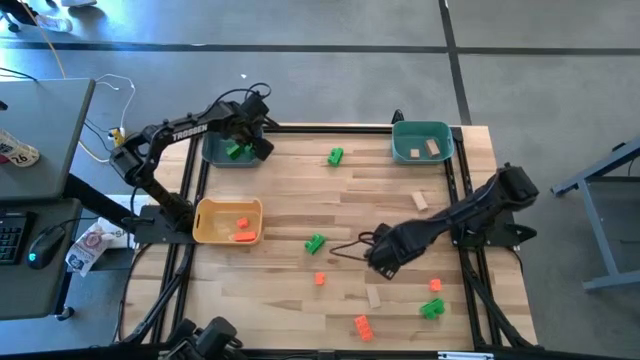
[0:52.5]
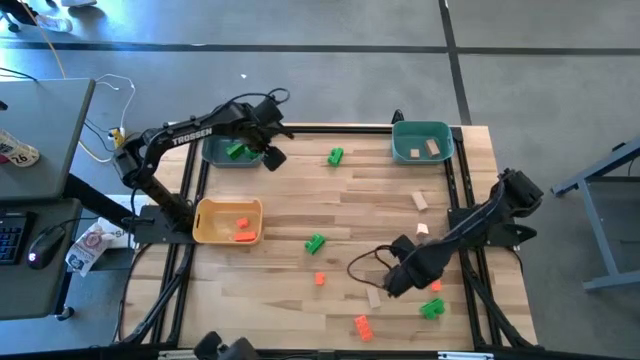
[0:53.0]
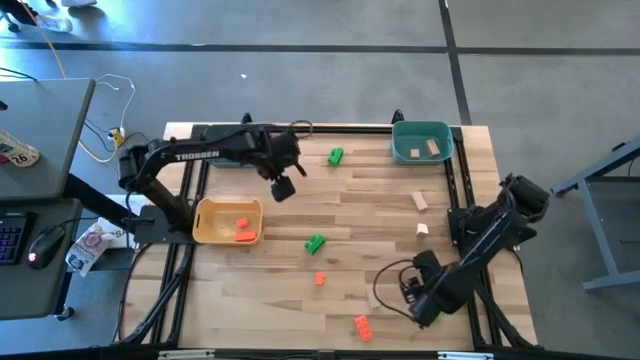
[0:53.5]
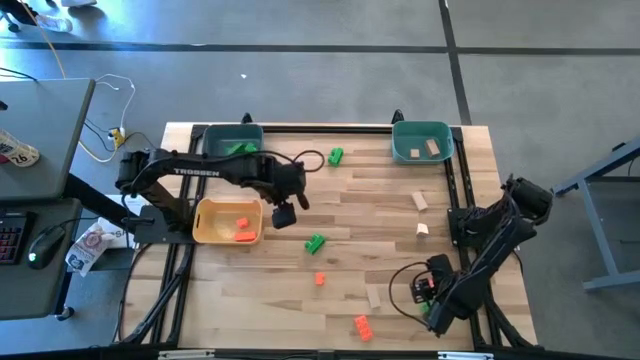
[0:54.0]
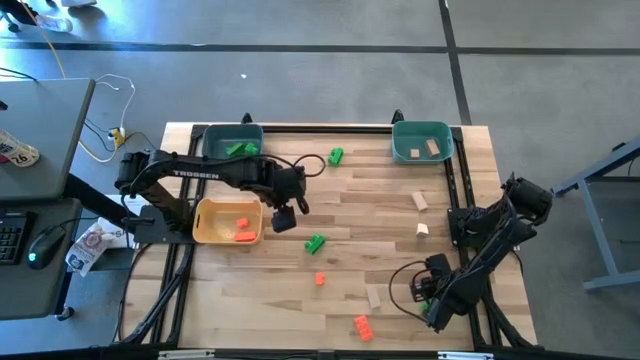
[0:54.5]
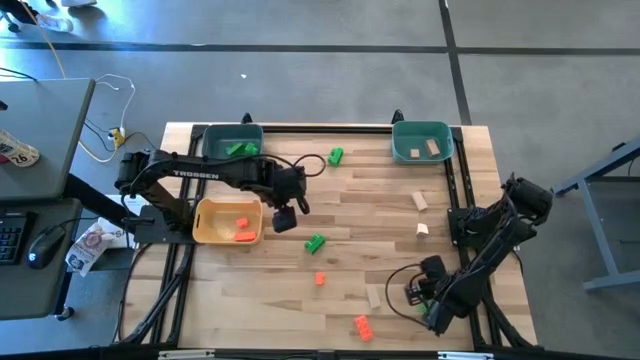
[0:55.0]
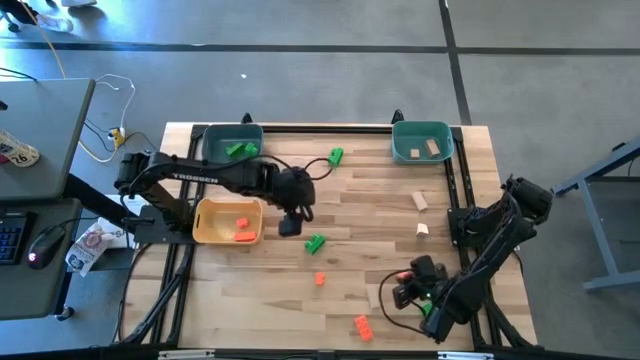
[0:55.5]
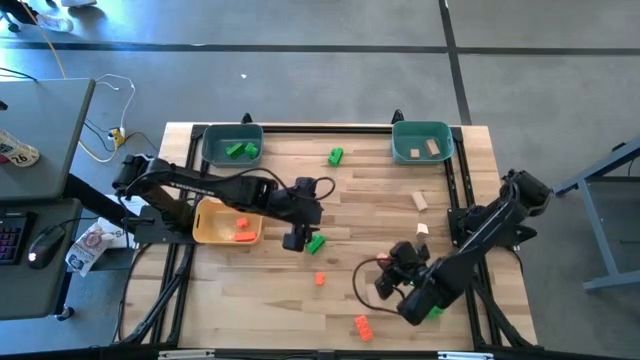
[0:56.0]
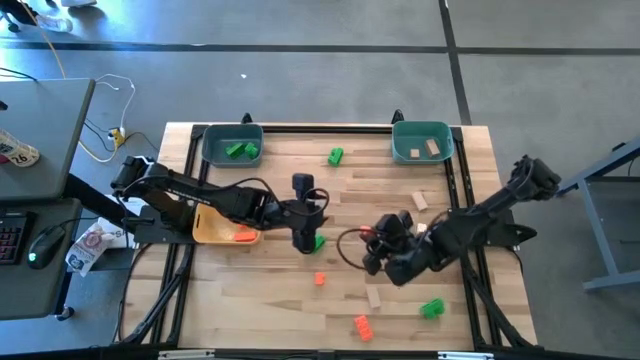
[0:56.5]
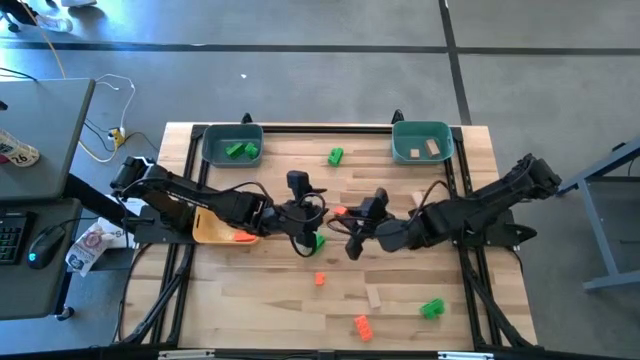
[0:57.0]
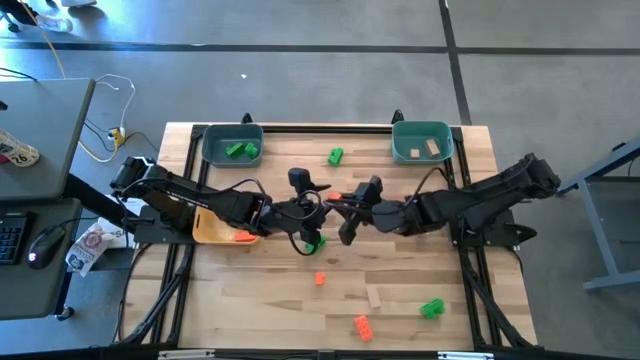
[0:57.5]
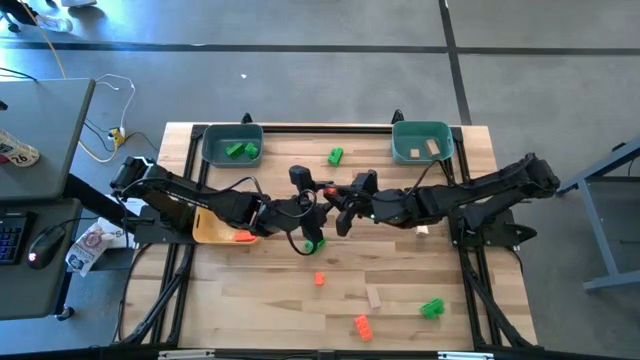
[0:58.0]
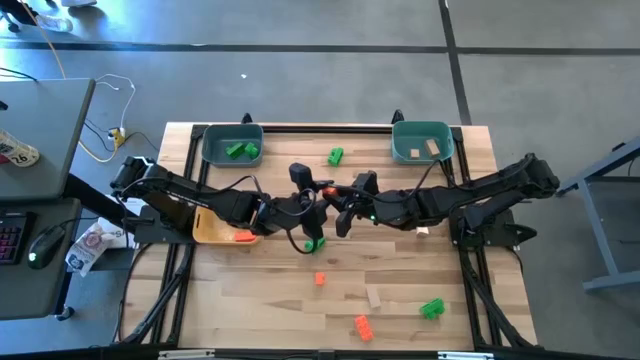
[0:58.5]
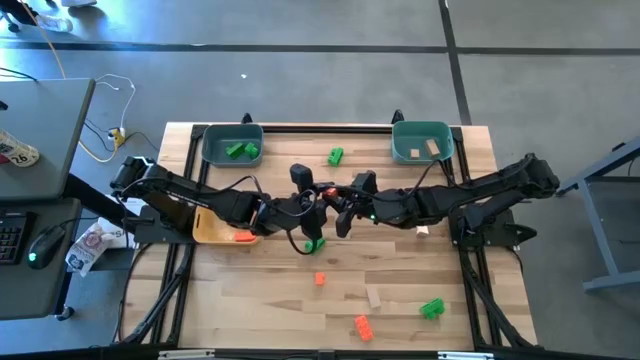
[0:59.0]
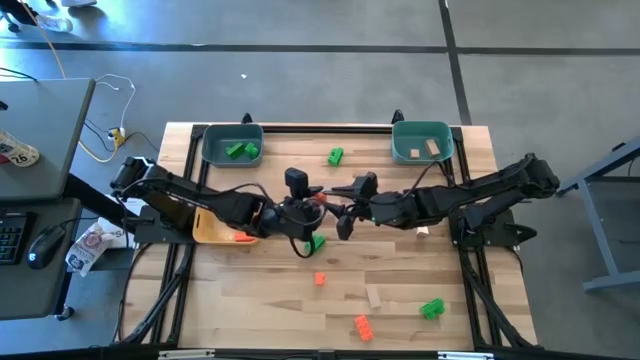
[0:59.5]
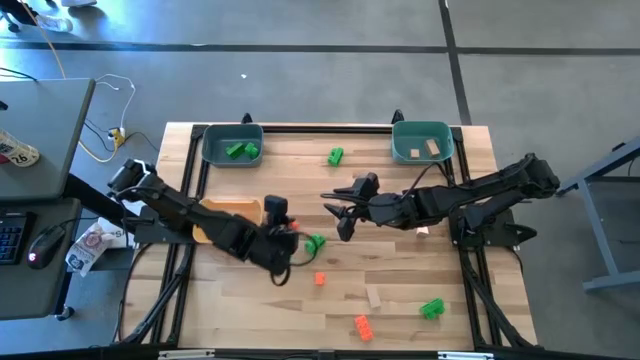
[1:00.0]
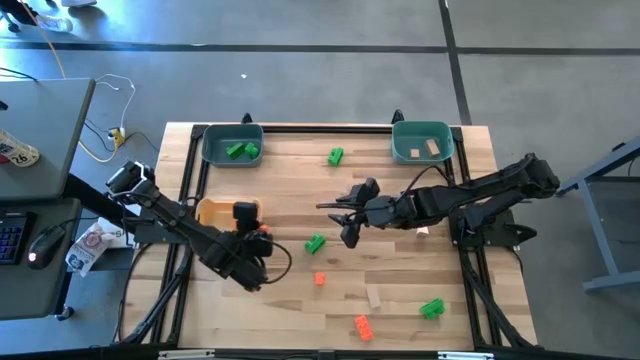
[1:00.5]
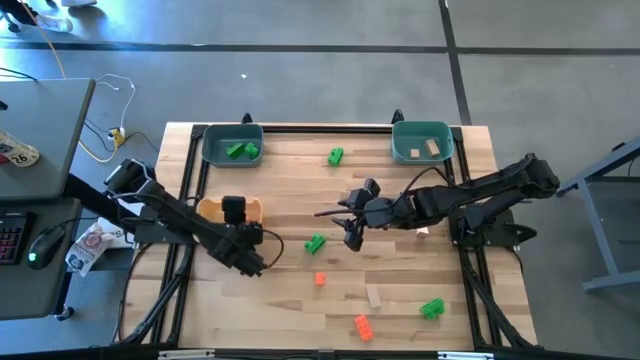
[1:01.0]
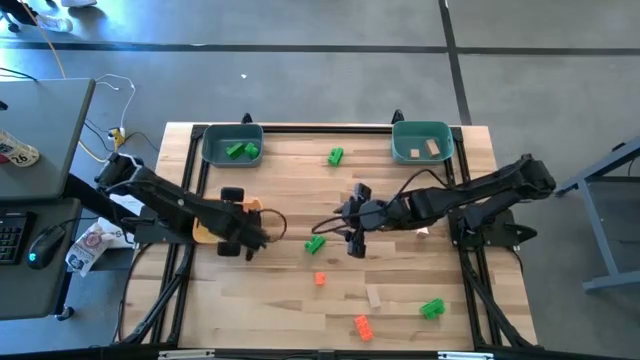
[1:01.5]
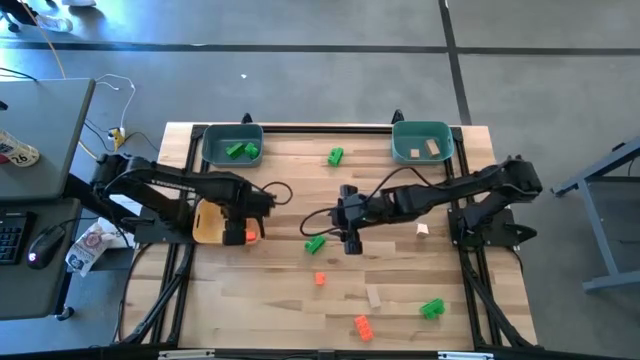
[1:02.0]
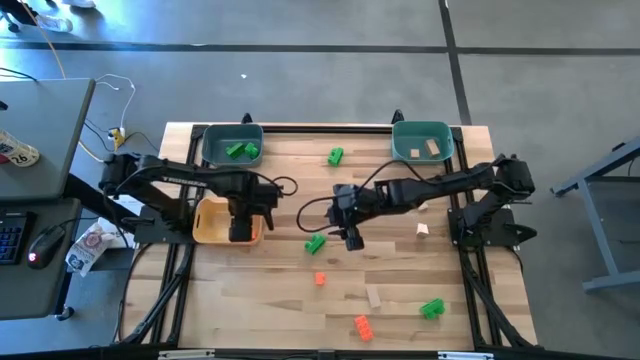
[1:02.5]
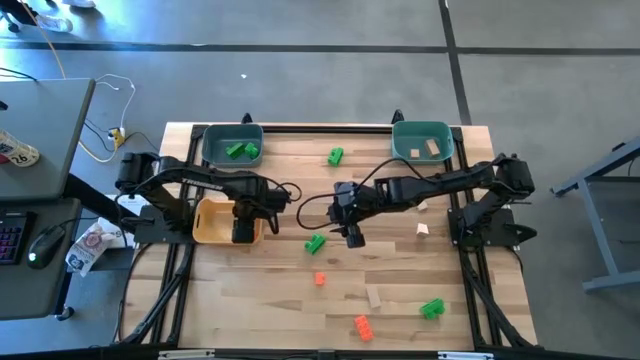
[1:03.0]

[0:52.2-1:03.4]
Task: Sort & place blocks by color
Put the orange game piece into the yellow bin

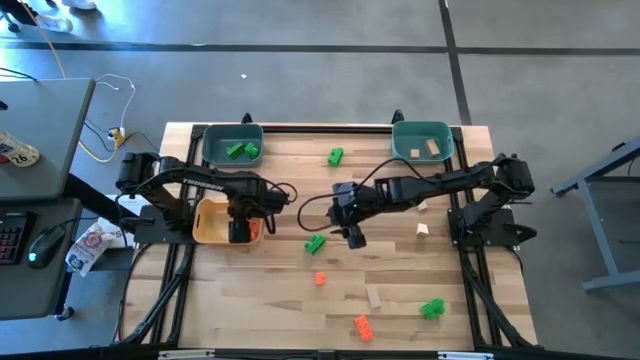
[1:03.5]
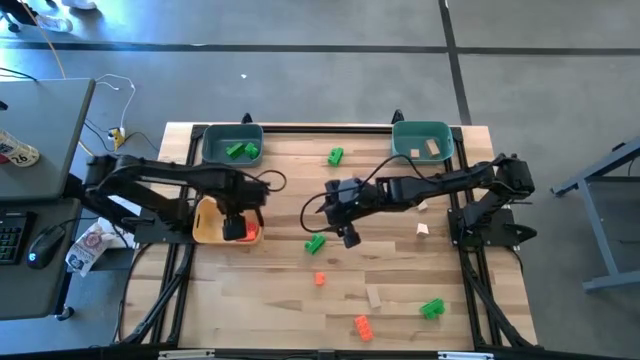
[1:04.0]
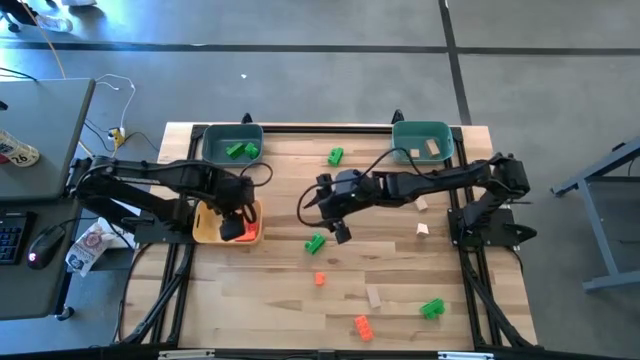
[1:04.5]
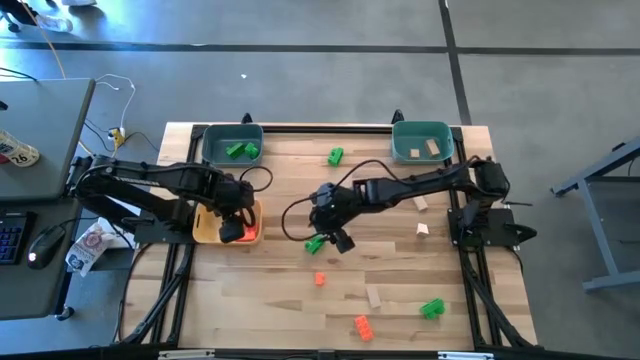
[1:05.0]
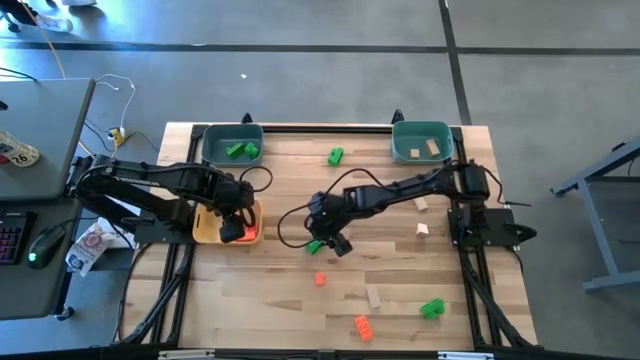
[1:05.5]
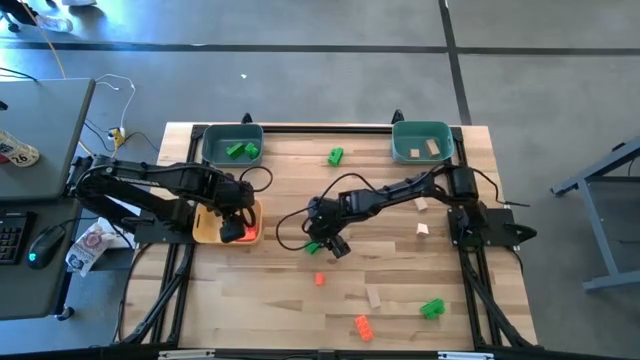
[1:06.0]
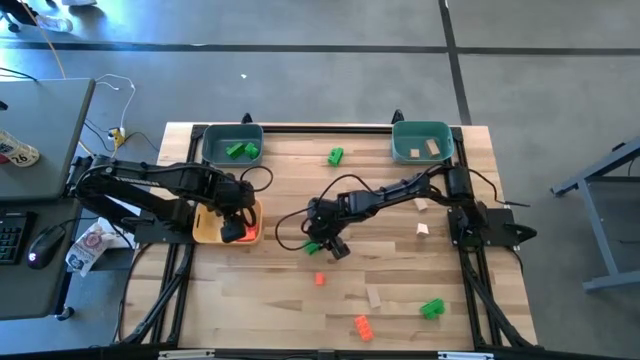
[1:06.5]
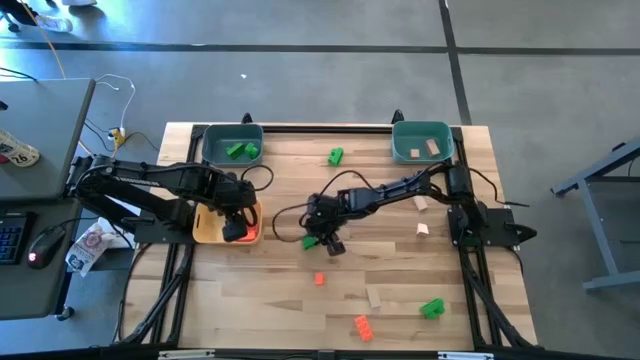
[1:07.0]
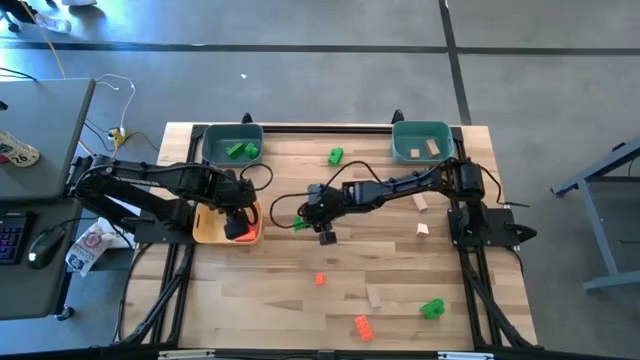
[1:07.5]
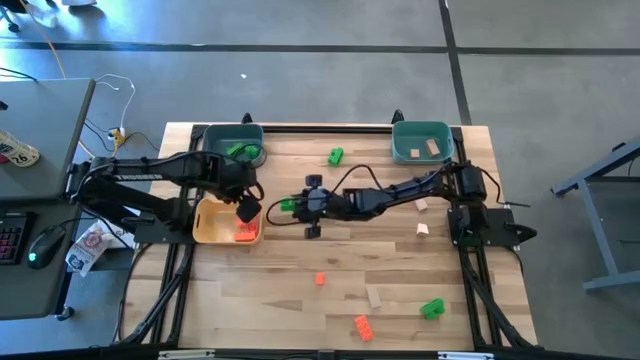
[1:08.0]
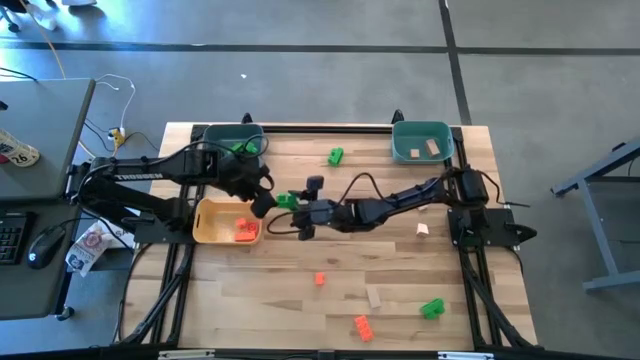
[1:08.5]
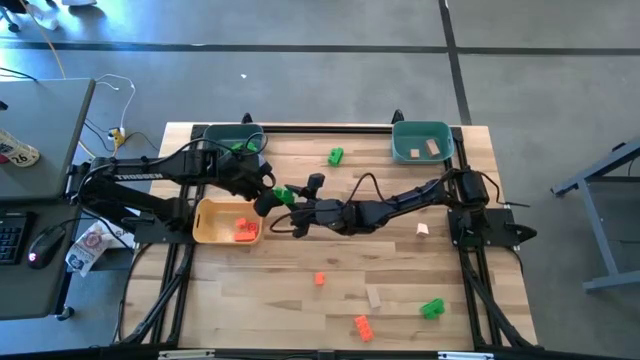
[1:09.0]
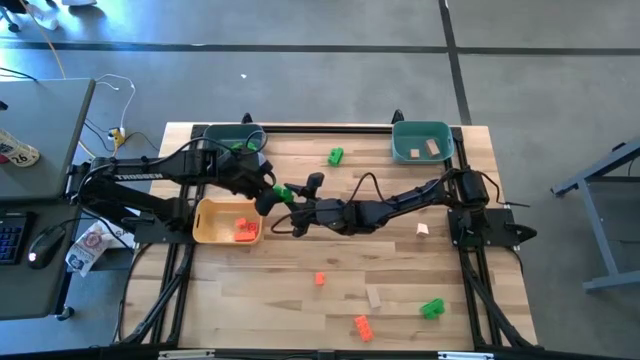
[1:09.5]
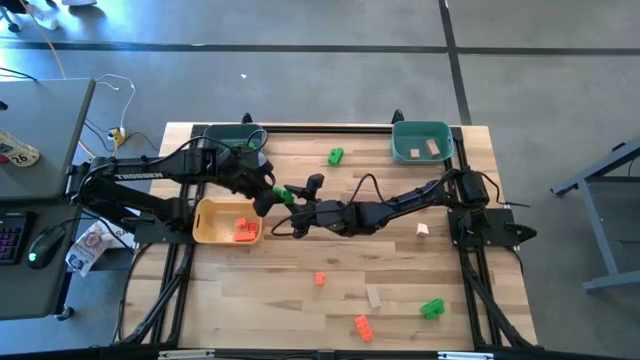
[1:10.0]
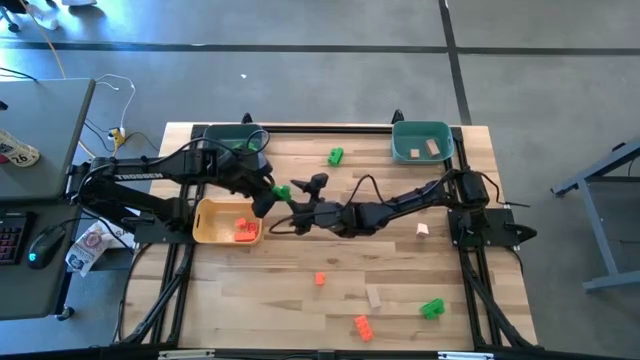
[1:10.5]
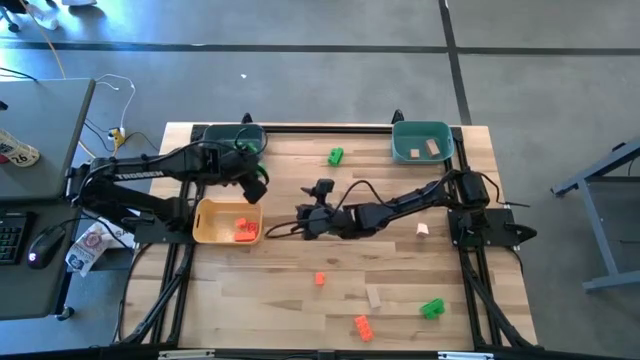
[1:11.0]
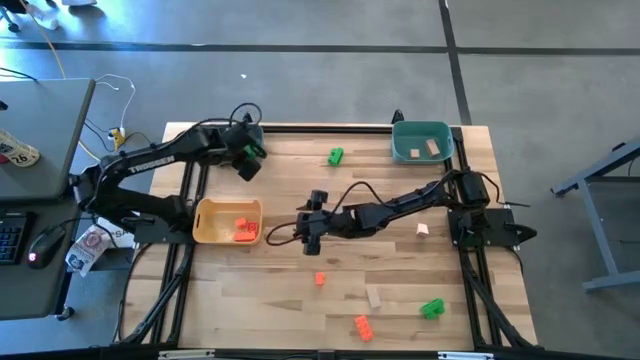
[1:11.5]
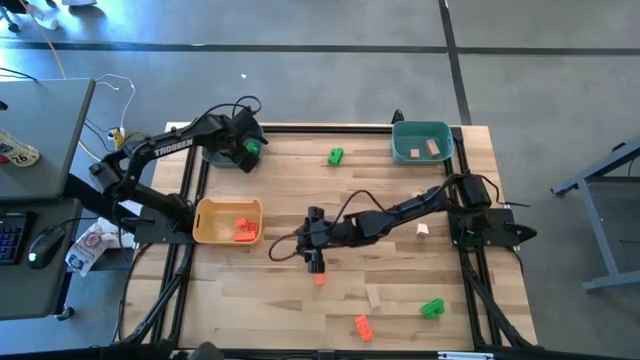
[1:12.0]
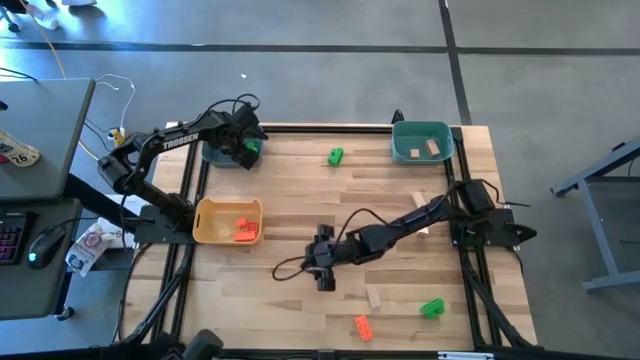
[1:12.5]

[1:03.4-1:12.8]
Put the green game piece into the blue bin

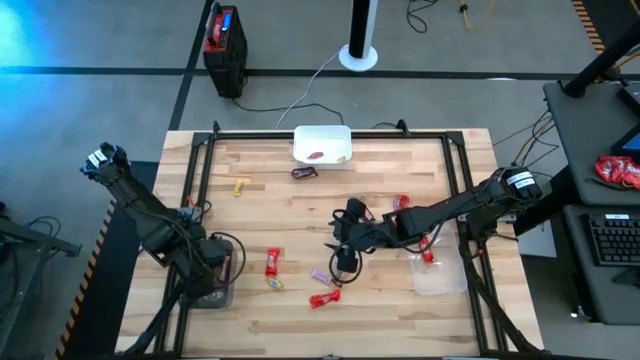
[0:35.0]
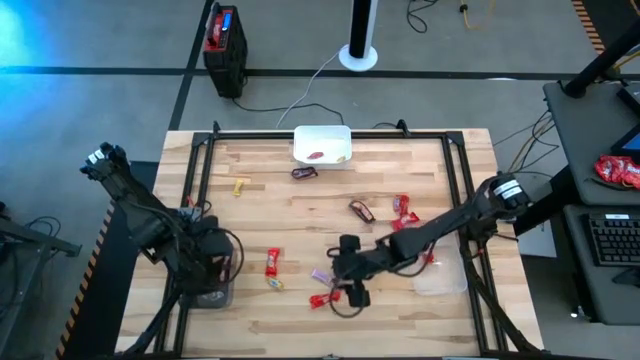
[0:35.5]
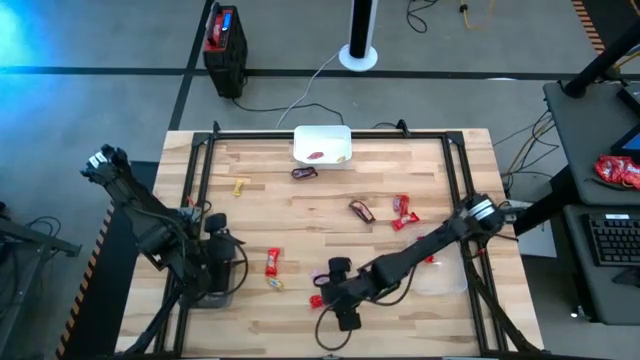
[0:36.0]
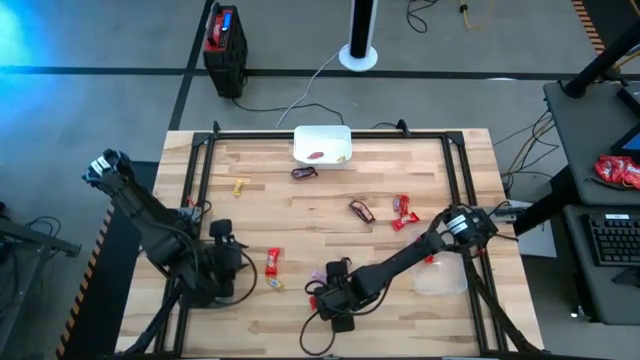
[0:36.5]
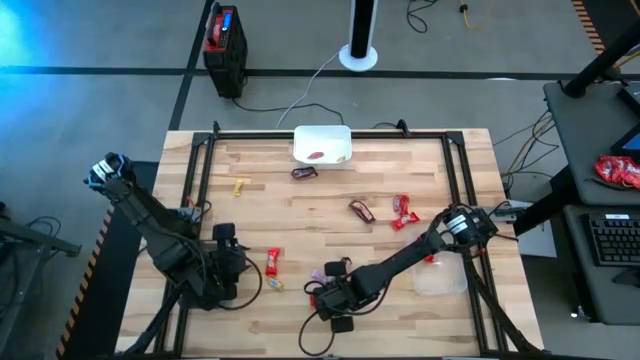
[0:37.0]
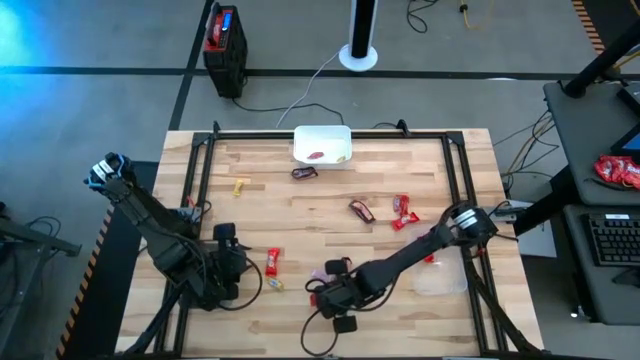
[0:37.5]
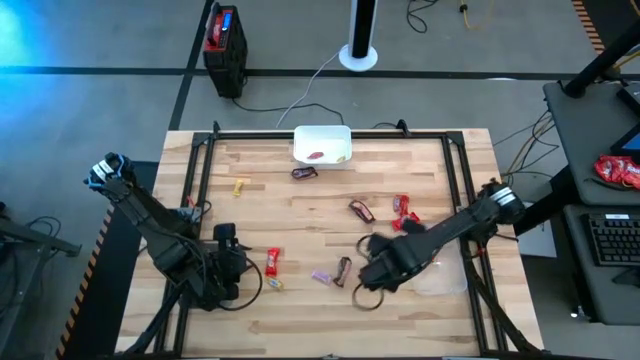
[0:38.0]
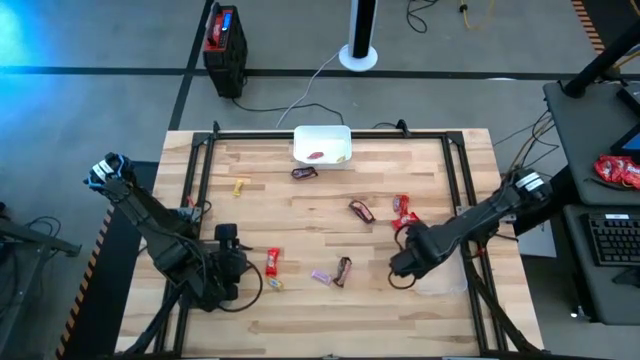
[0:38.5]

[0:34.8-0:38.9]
Task: Sort candy by brand, put in halloween buckets
Put the red chocolate bar into the transparent bin
